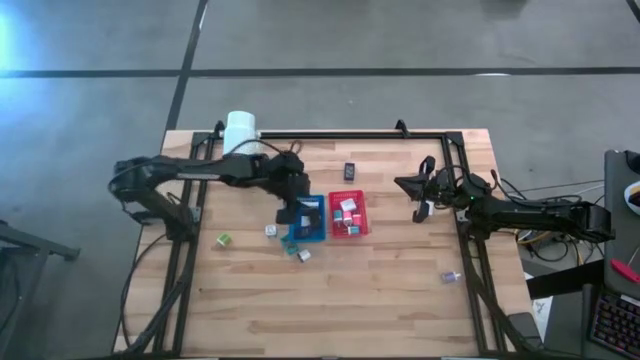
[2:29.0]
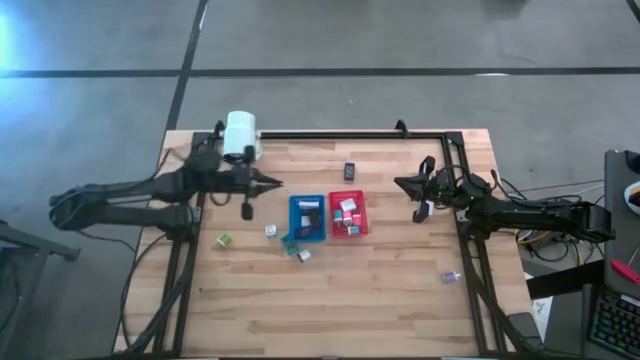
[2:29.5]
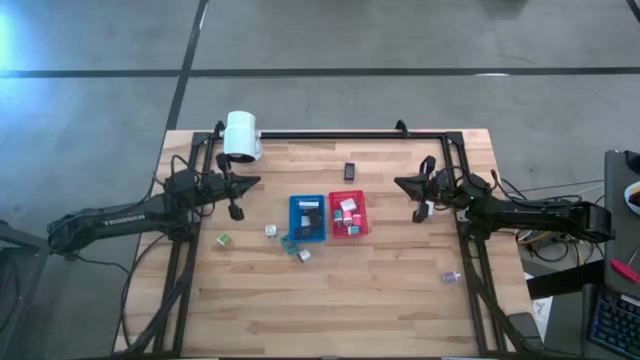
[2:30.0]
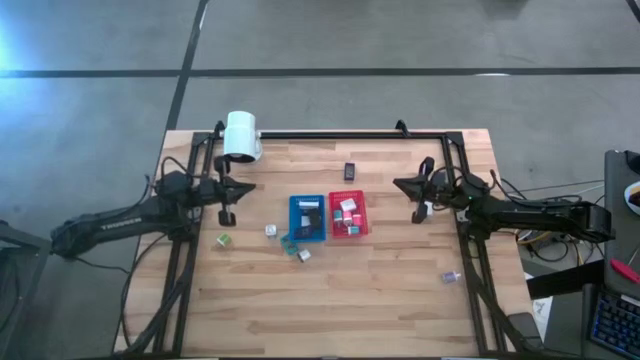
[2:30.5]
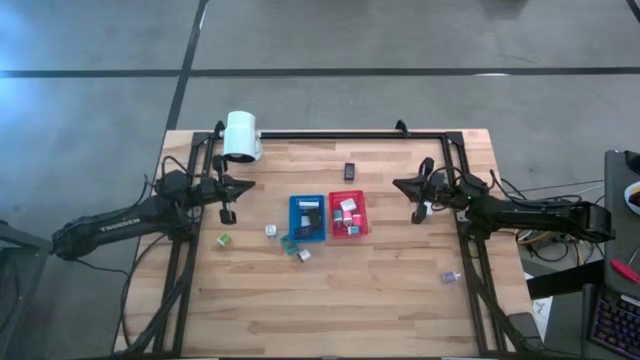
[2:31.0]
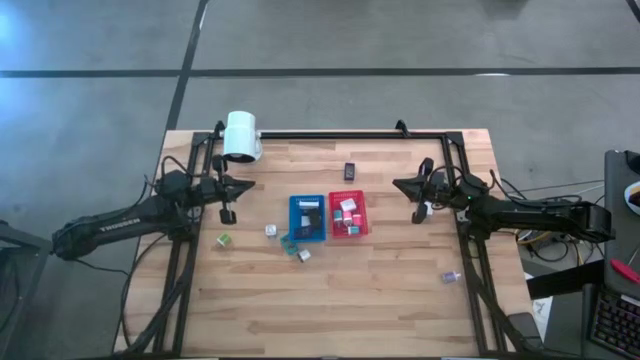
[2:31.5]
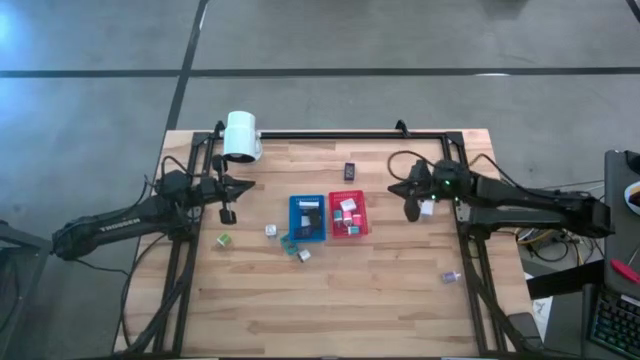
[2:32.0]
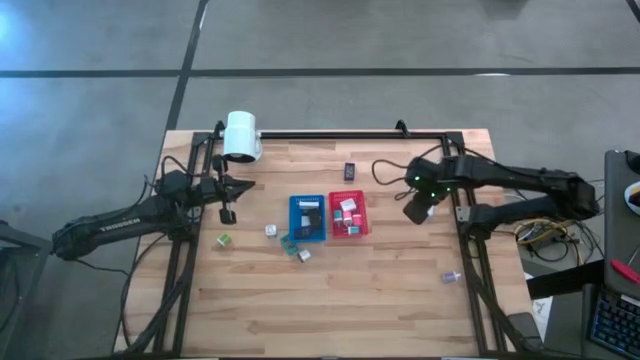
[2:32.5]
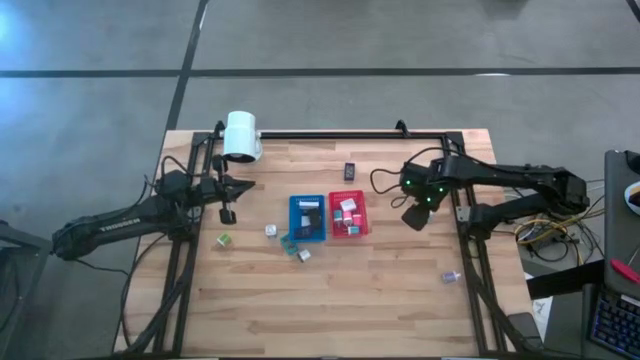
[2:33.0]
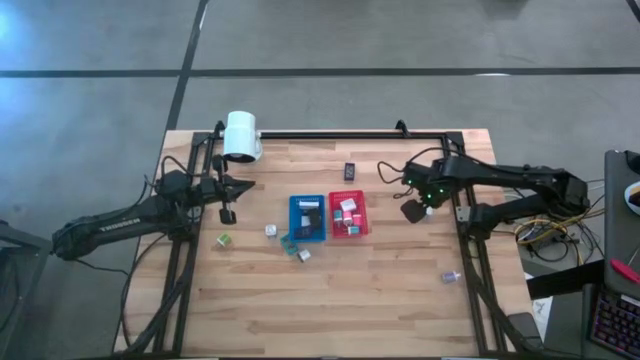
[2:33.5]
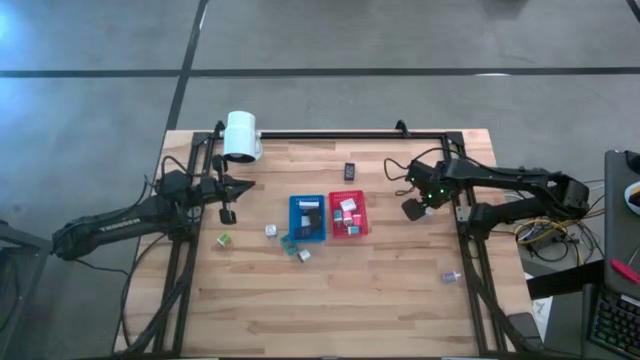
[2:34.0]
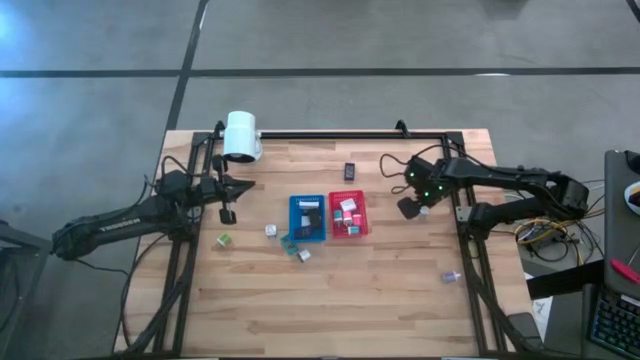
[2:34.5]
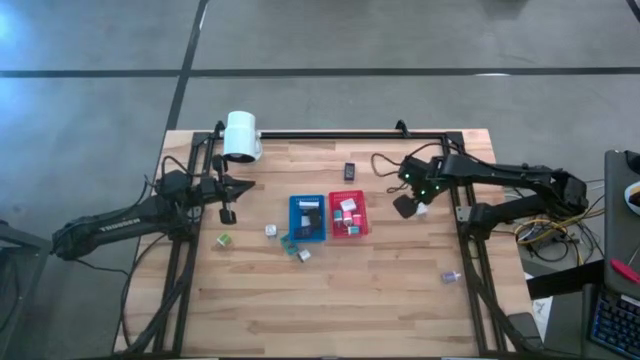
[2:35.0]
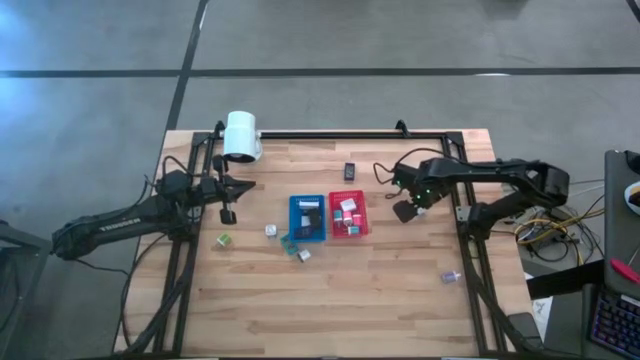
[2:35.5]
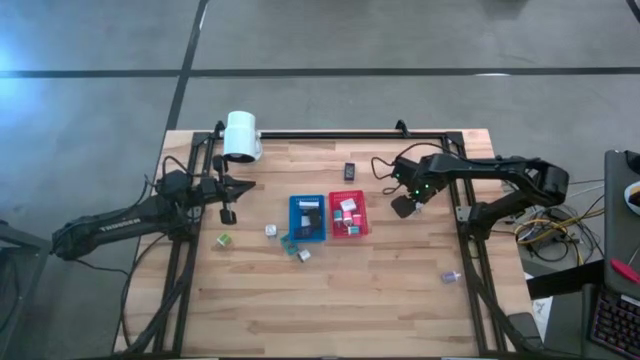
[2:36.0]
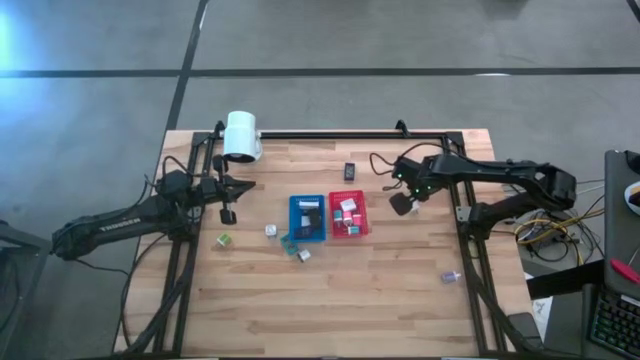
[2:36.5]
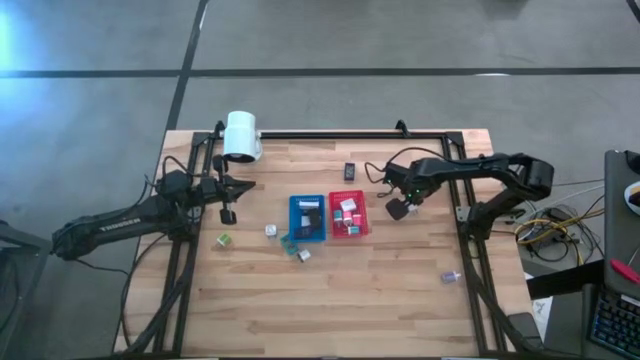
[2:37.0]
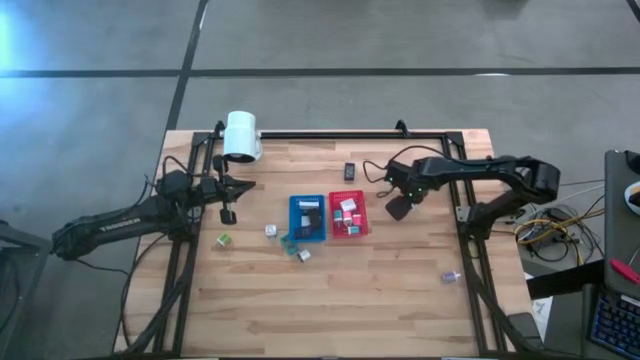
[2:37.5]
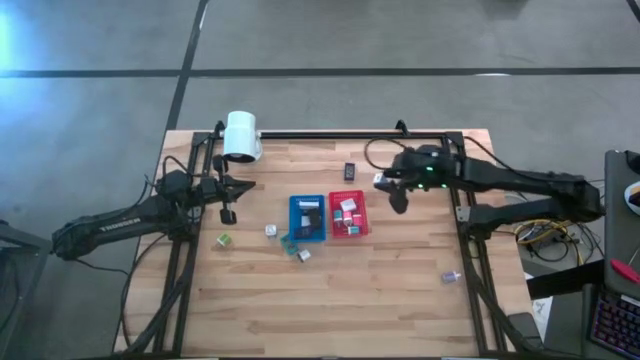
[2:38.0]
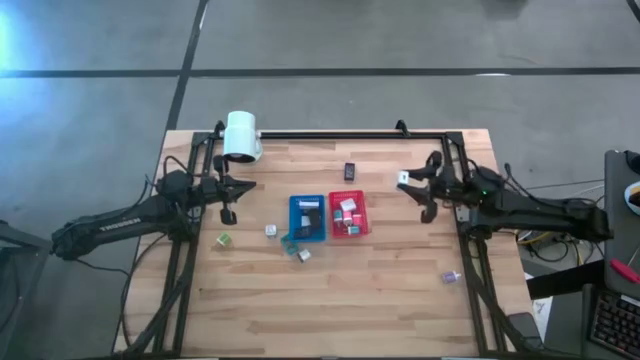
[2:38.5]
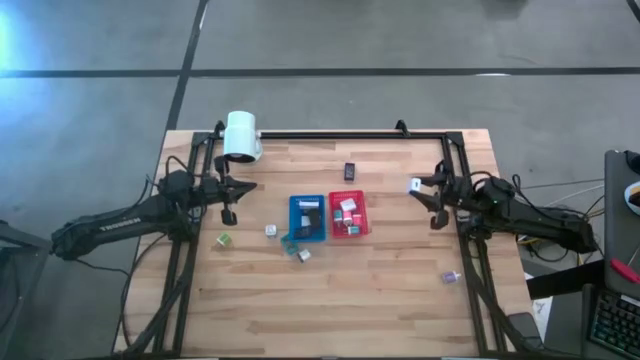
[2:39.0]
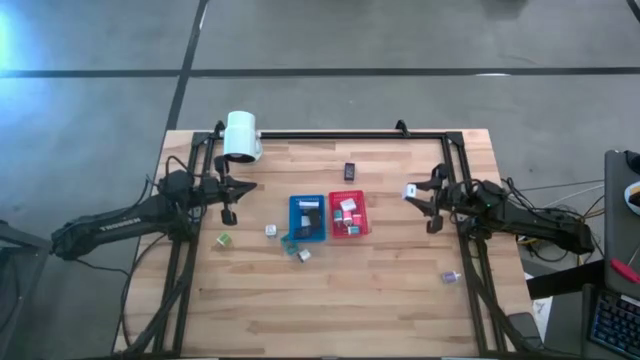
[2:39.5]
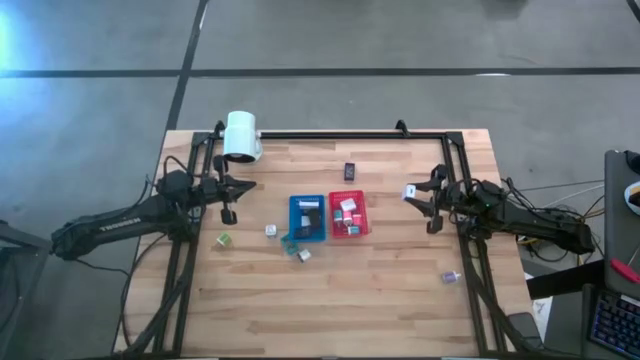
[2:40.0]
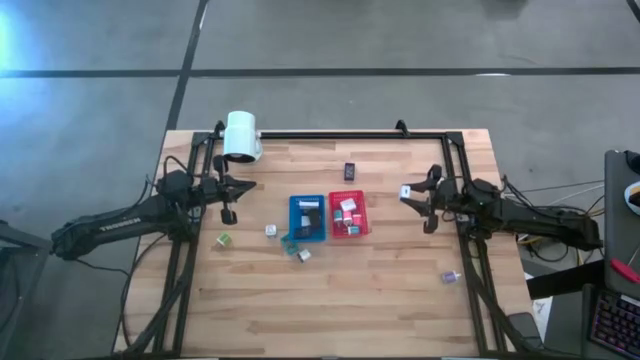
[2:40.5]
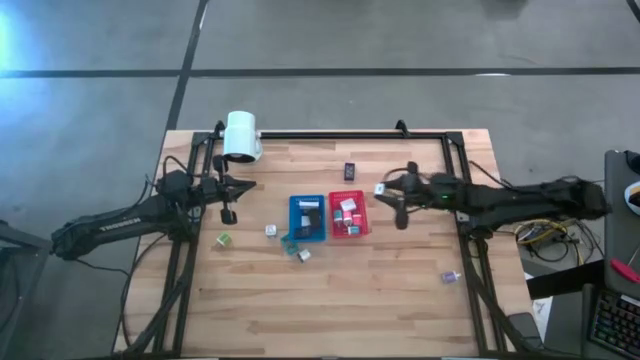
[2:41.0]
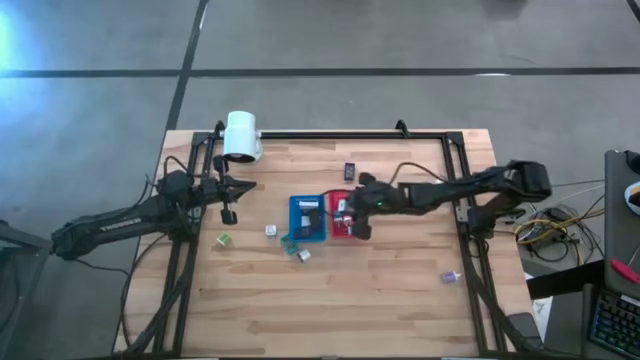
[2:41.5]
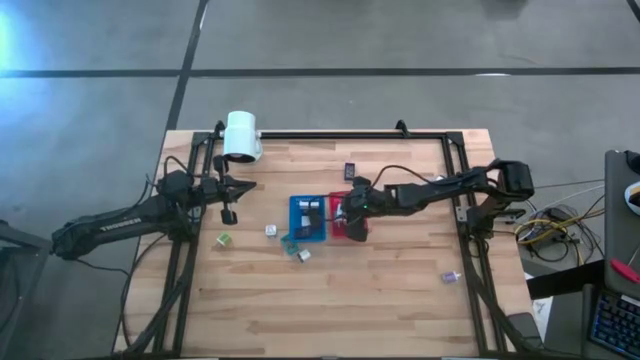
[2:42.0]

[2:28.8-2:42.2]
Task: Pick & Place Office items
Put the white adaptor into the red bin

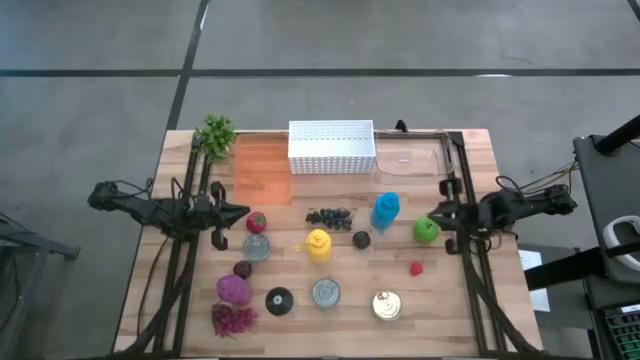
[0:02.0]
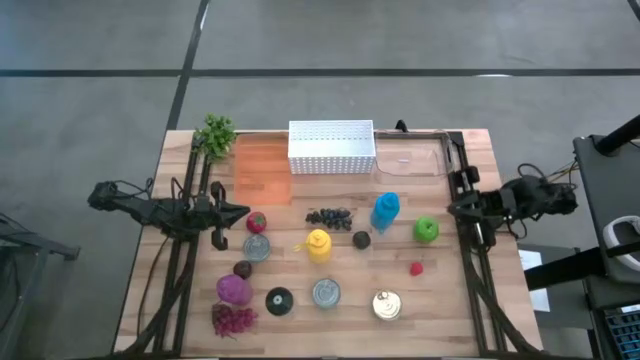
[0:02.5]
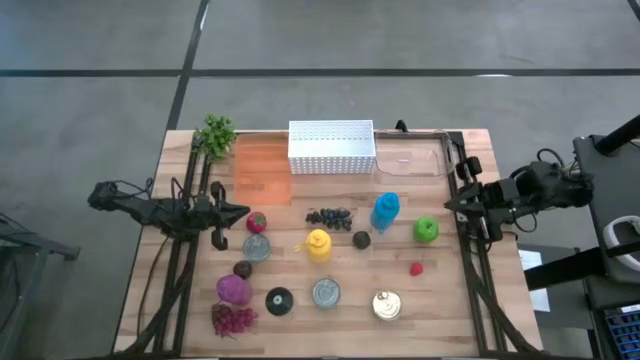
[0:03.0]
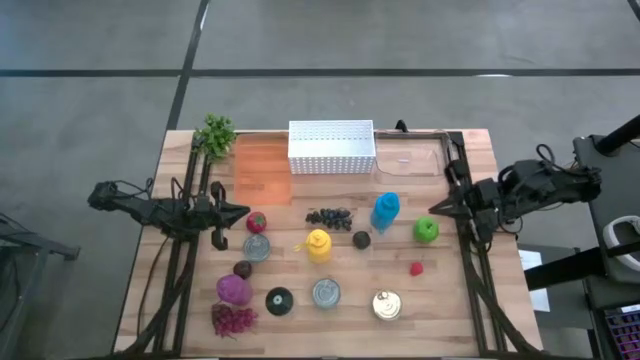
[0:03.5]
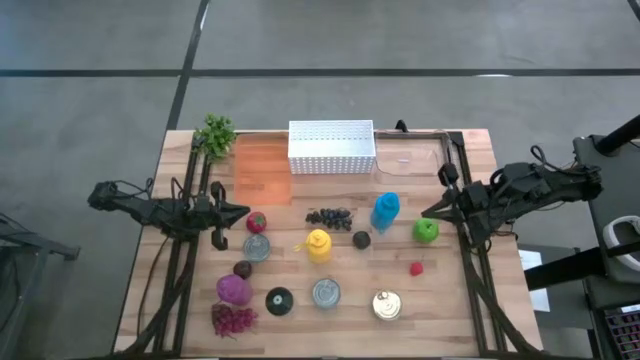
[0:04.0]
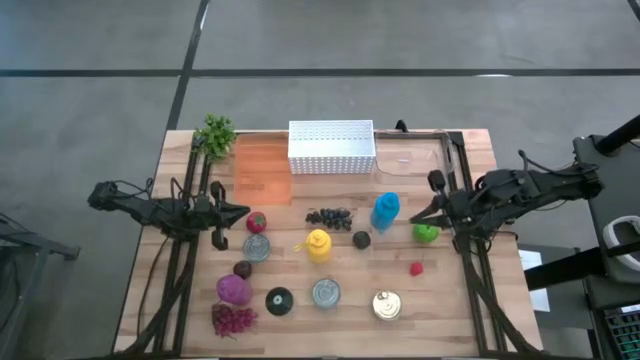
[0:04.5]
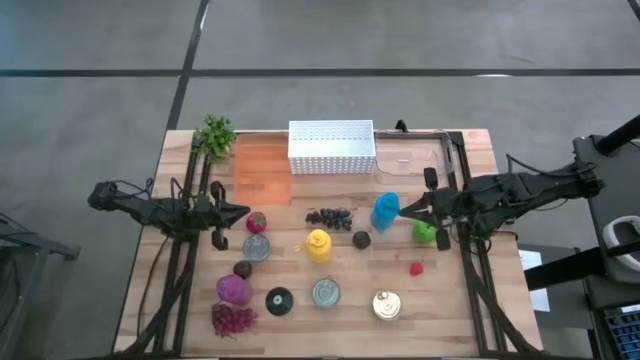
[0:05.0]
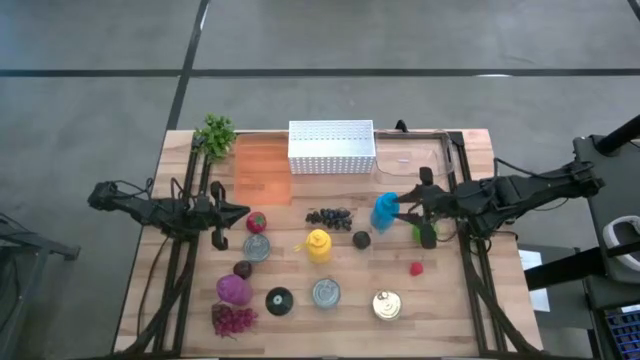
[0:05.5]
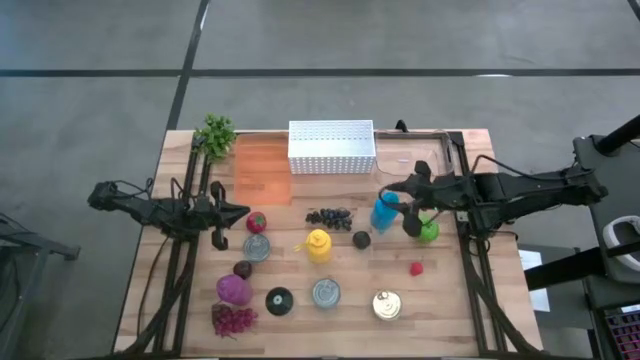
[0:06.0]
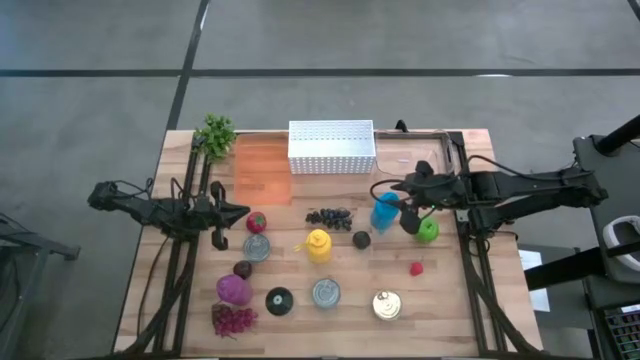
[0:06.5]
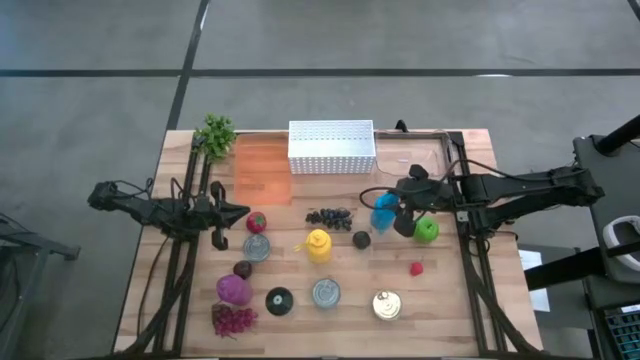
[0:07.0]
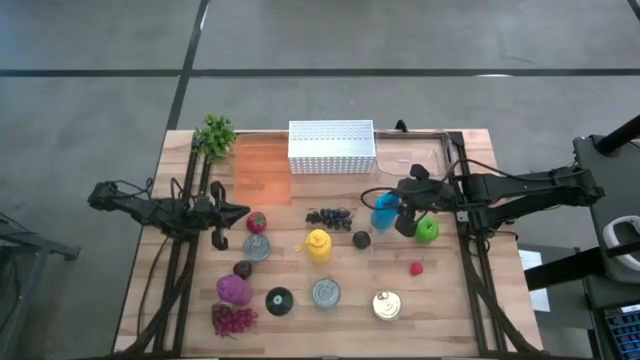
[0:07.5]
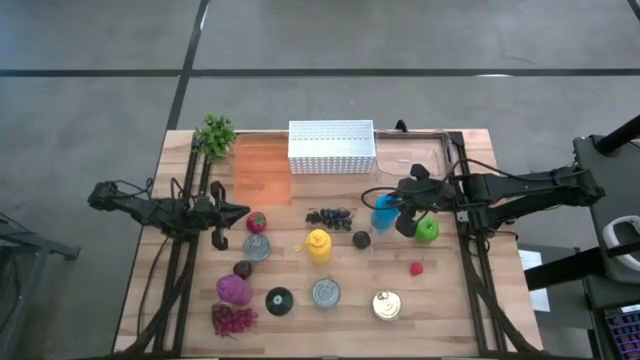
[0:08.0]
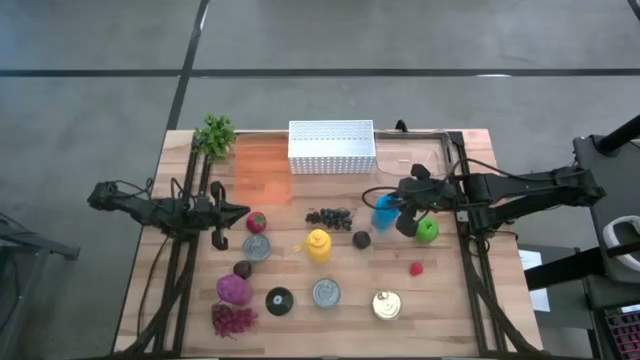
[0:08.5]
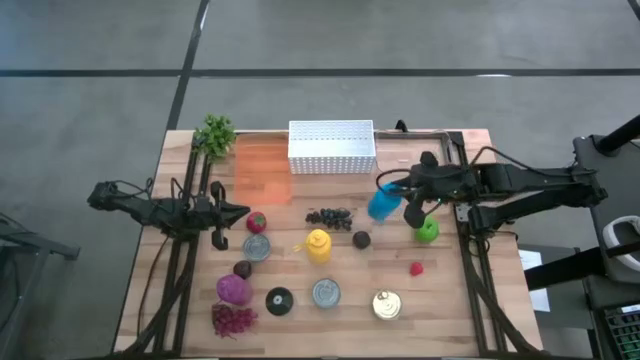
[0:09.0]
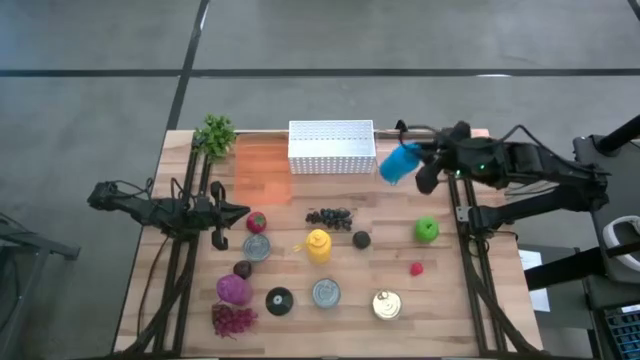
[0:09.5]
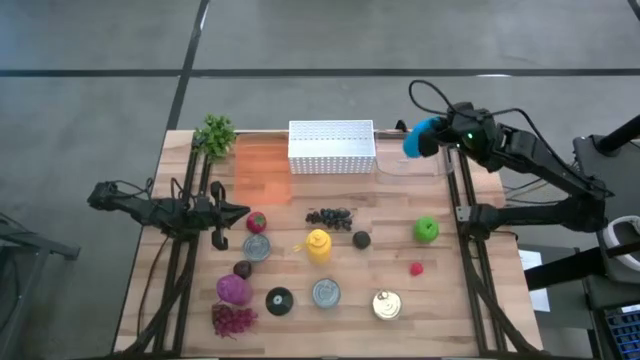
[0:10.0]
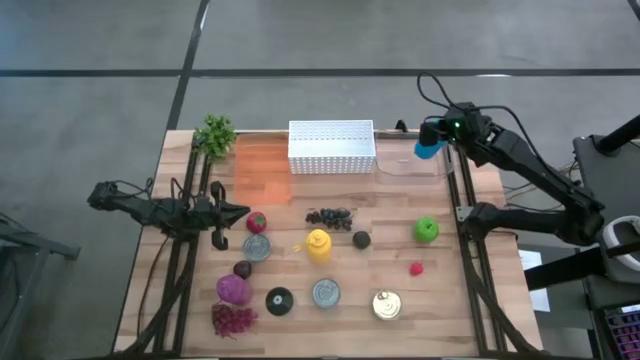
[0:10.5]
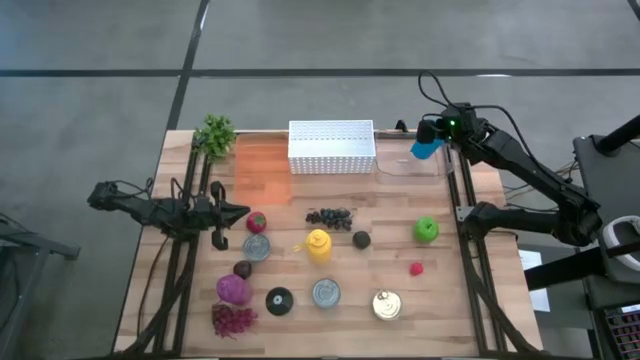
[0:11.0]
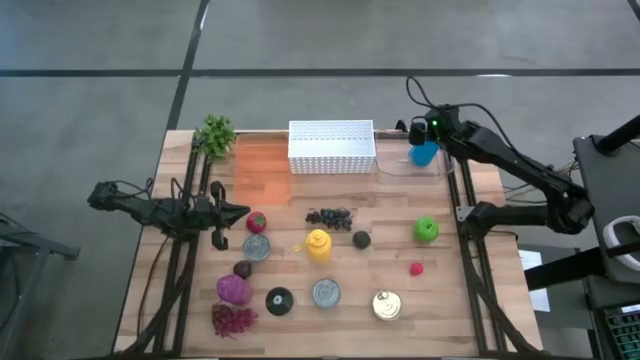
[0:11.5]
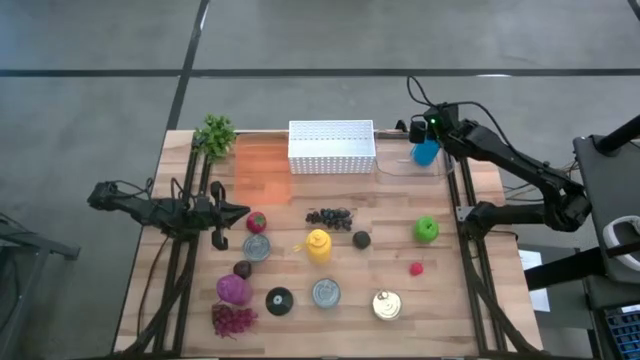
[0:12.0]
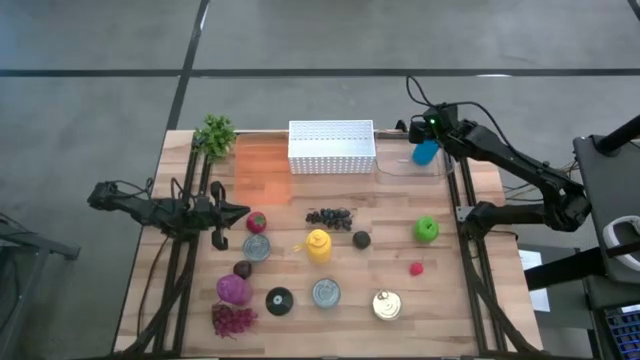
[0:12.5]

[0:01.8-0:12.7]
Task: Pick & Place Food Item
Put the blue water bottle into the transparent bin
